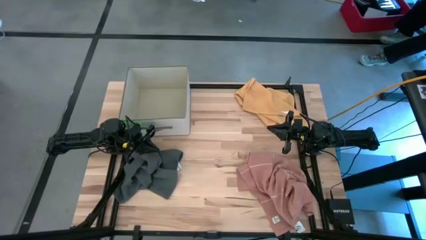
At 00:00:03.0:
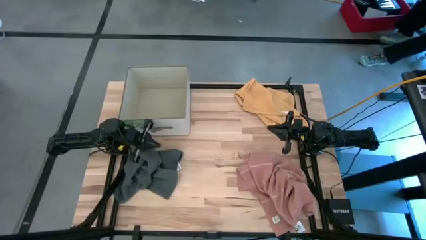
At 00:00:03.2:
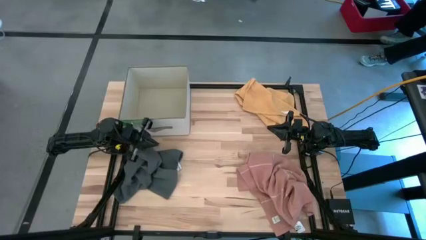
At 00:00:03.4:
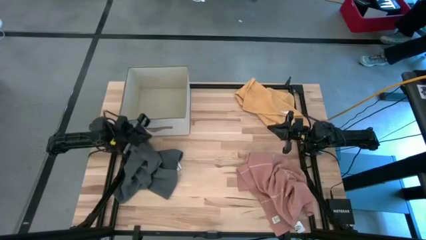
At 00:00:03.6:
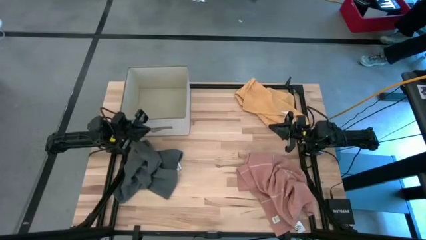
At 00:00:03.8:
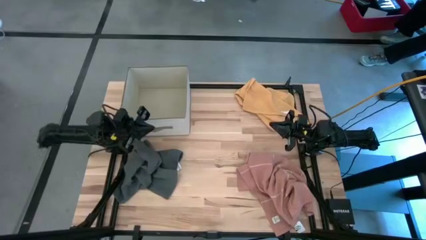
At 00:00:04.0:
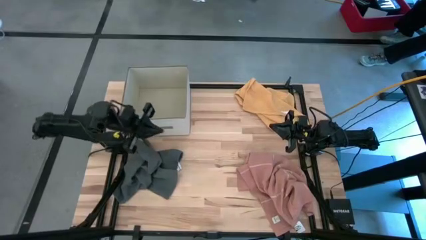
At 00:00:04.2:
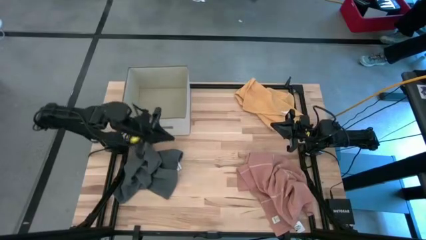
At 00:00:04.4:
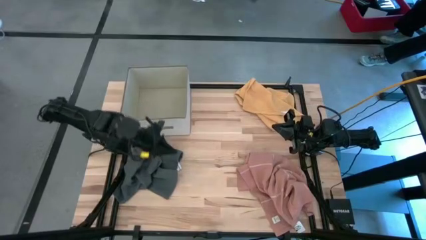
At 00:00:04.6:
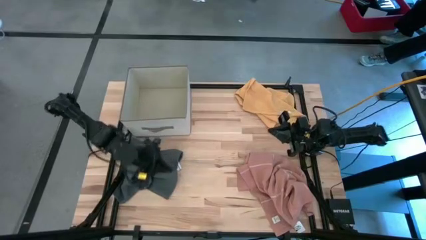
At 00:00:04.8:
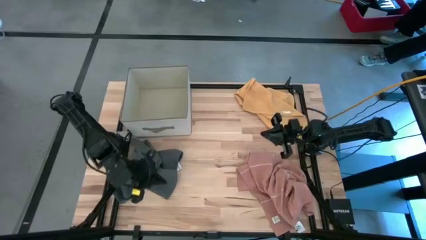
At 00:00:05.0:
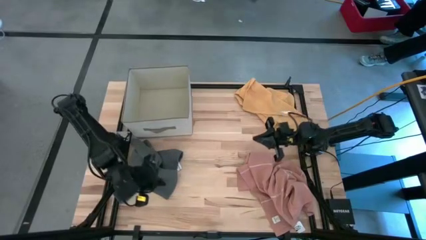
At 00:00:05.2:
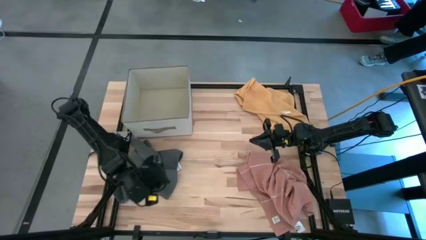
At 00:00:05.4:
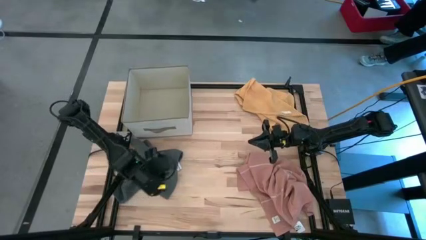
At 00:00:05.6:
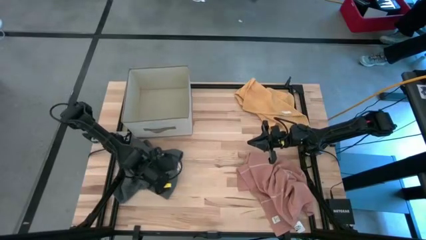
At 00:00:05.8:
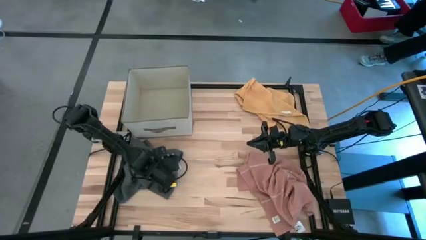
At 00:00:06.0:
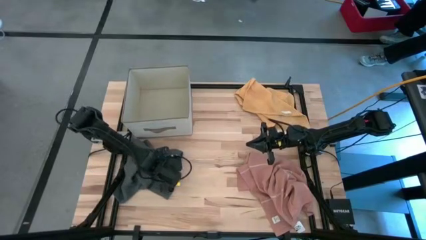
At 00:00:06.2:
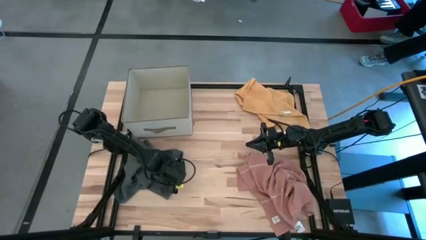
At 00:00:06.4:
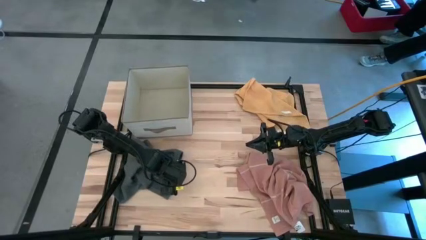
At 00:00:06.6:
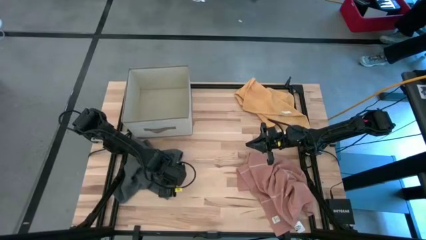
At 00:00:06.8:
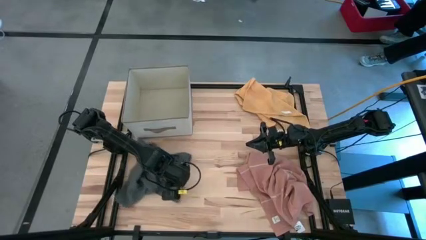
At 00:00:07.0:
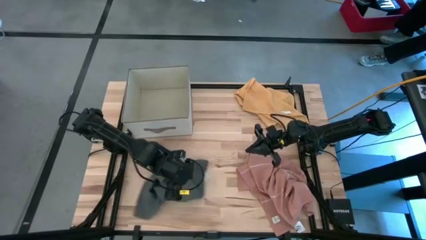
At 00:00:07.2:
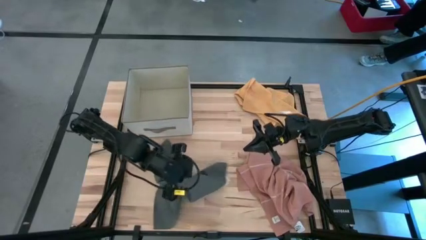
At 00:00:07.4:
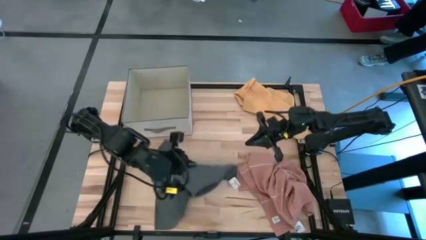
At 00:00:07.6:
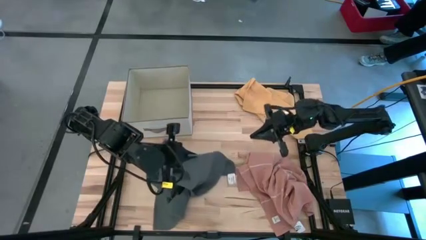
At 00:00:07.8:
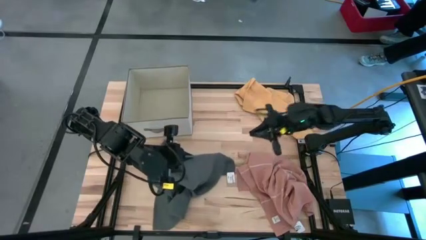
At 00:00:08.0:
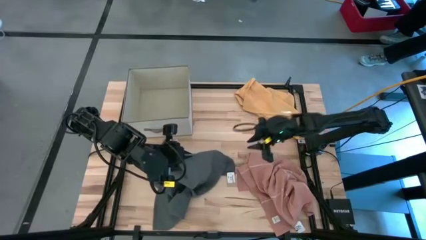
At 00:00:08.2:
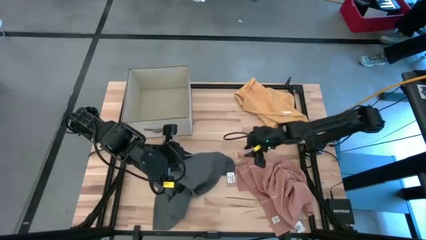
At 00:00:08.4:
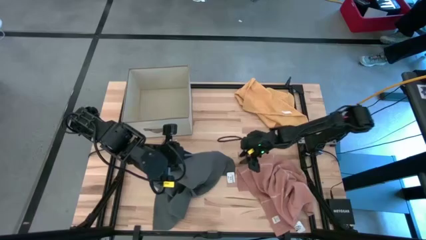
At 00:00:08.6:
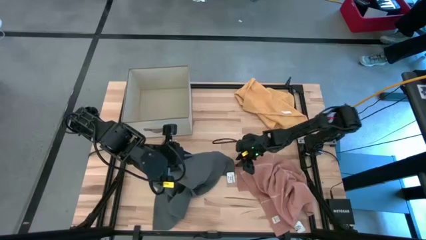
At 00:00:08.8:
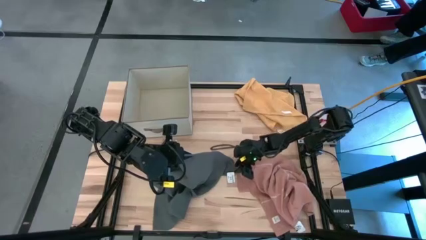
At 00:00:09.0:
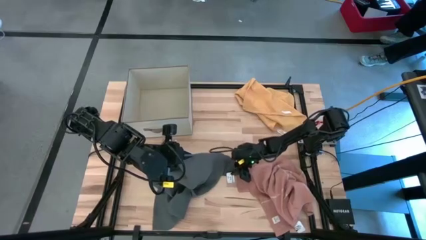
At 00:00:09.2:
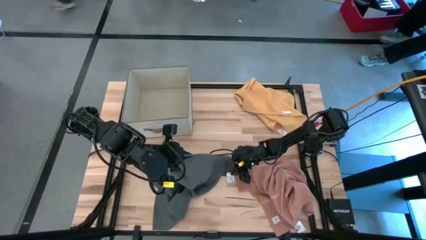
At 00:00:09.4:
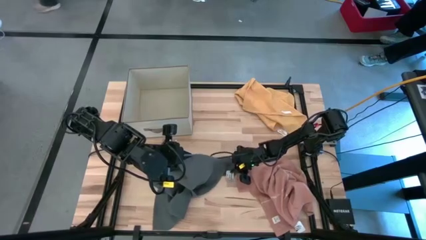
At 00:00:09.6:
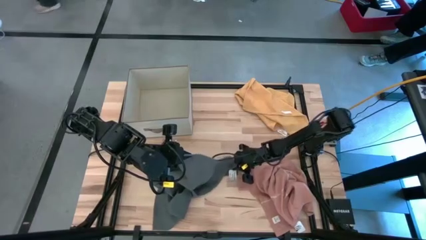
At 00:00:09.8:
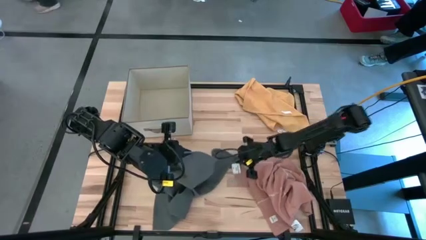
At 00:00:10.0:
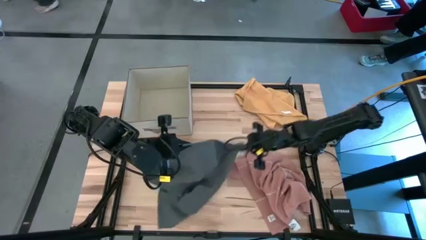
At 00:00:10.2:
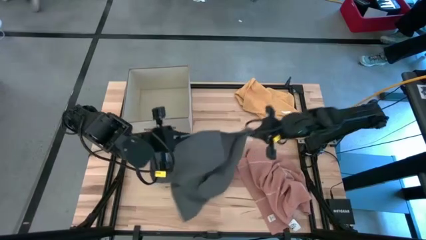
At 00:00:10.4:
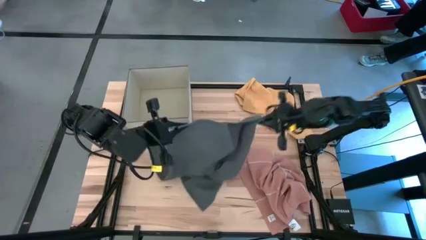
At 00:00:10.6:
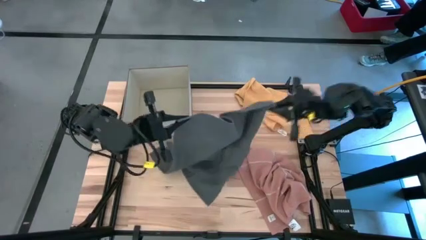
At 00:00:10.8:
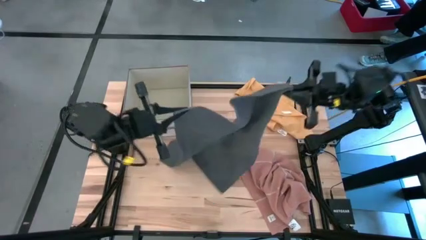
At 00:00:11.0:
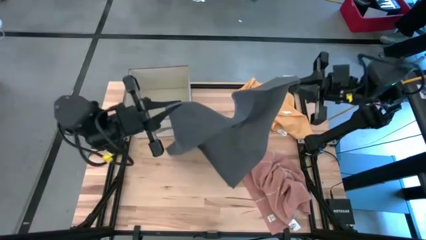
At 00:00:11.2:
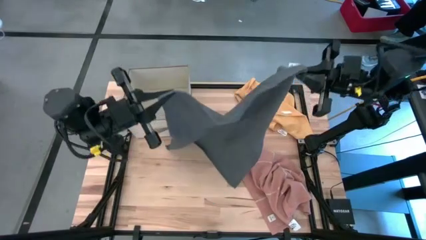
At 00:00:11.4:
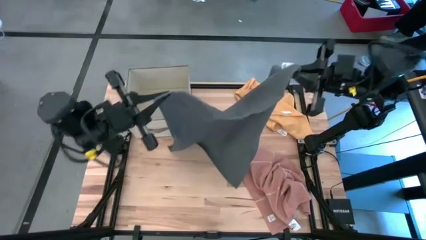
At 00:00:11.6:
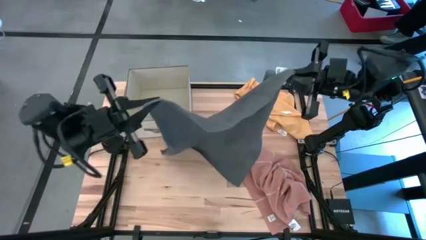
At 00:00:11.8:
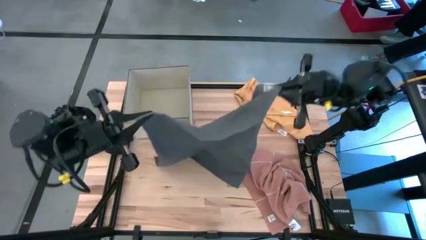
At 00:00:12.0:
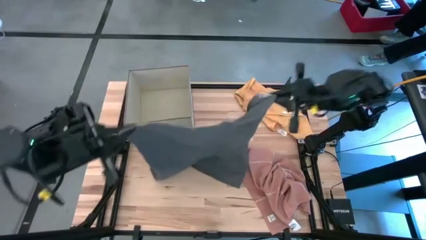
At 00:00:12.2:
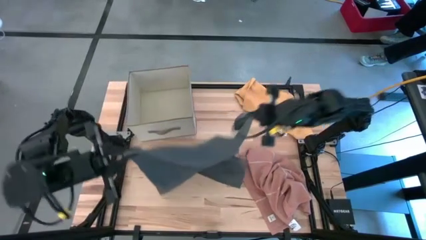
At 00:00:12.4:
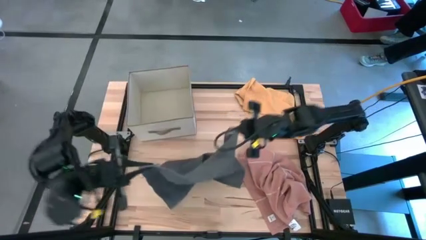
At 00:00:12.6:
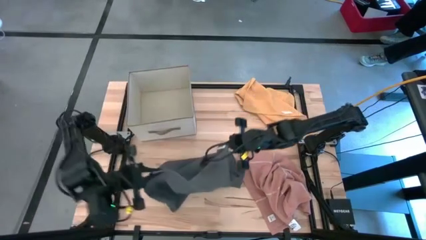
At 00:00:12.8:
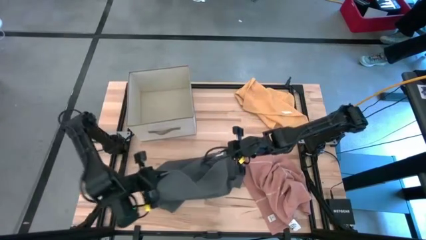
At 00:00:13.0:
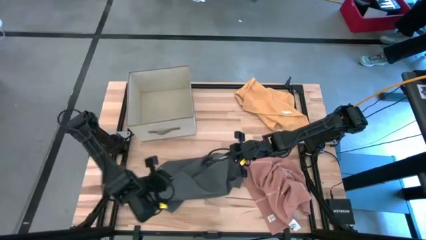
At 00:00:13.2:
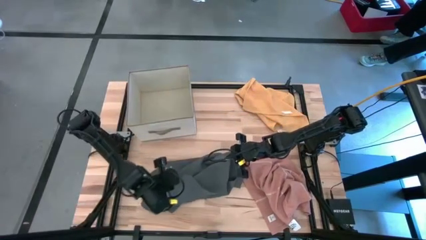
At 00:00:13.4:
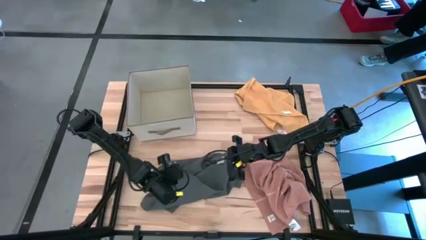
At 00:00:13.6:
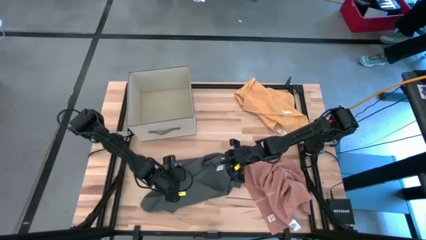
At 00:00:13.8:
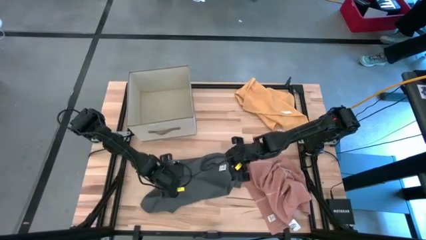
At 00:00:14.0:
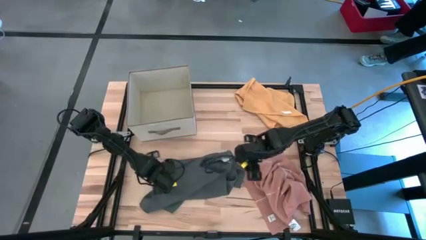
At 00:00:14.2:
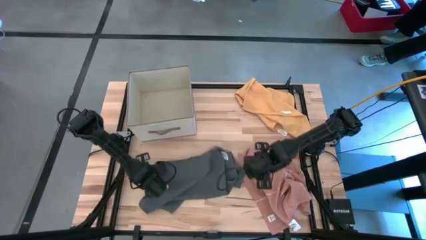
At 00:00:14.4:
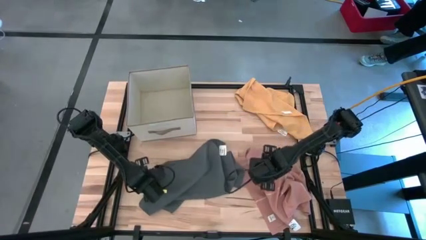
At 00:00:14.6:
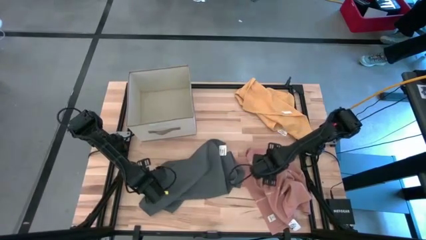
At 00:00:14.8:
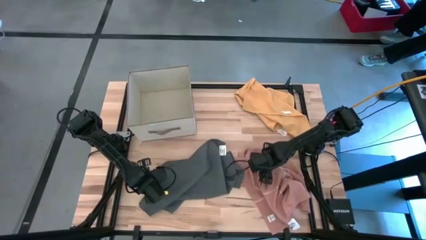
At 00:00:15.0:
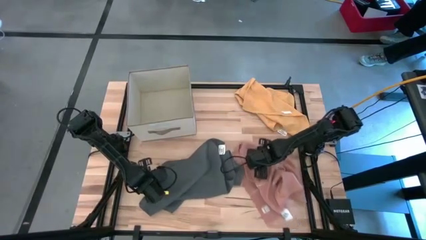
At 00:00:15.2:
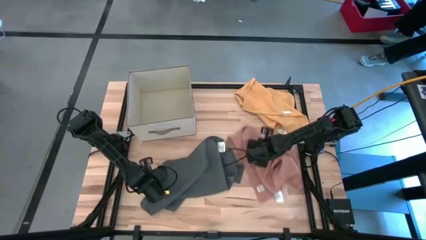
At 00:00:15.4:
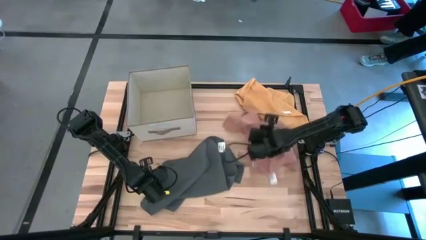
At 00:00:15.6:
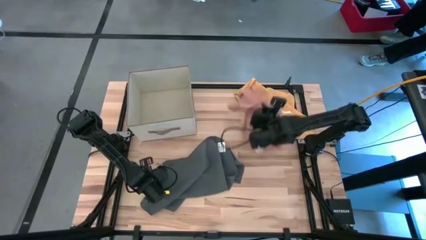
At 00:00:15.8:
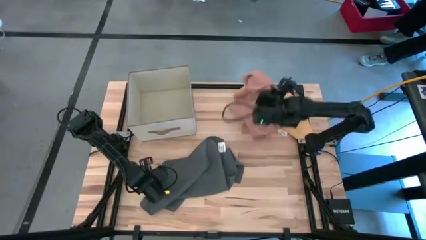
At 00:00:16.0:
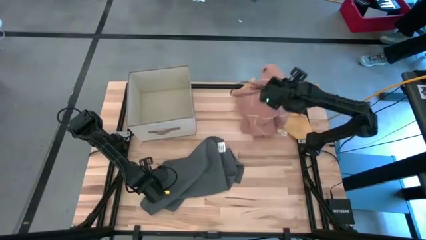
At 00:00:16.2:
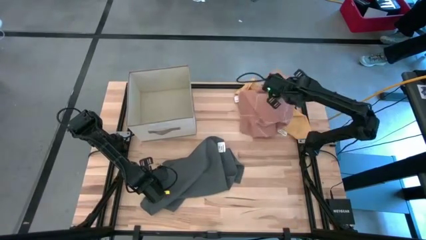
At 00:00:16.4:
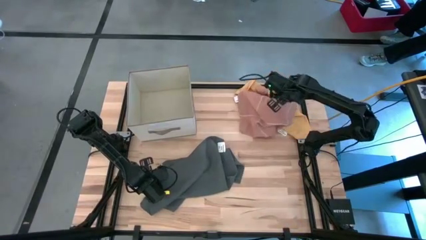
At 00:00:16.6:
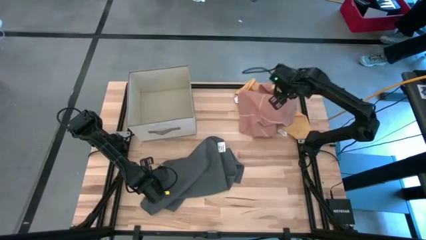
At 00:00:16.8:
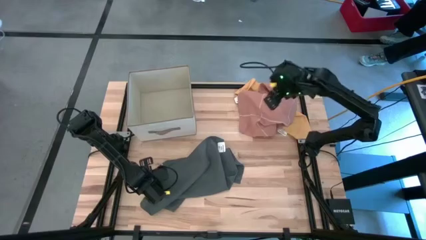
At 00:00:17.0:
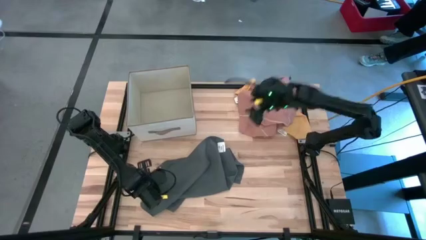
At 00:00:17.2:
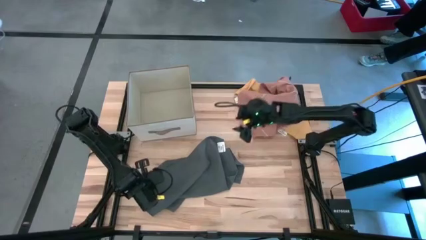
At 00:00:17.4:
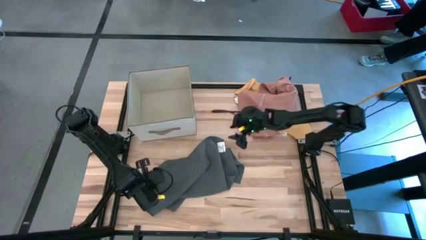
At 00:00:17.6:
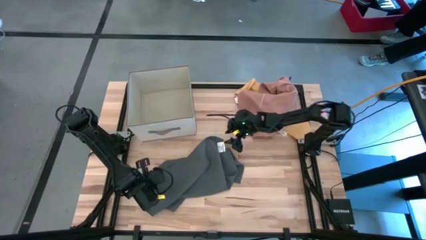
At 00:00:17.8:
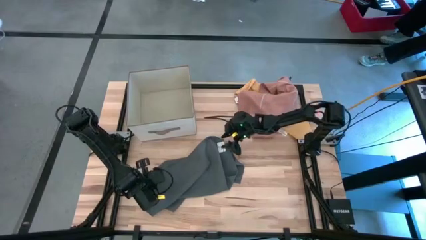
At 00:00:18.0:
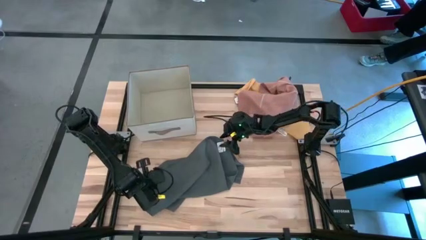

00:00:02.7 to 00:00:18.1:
Task: Fold towel
Fold the grey towel
